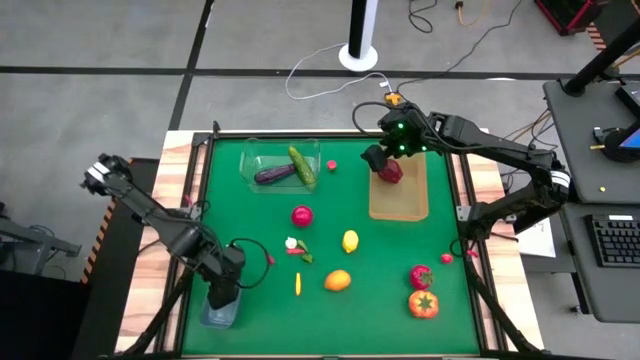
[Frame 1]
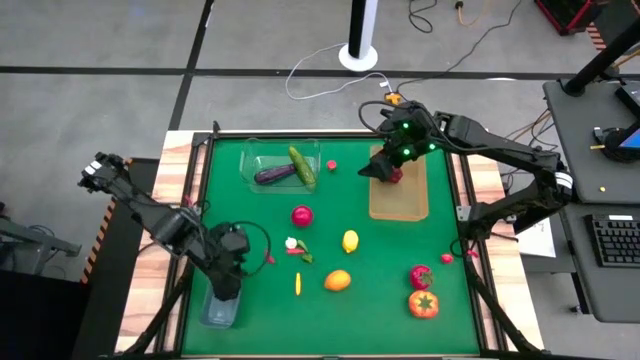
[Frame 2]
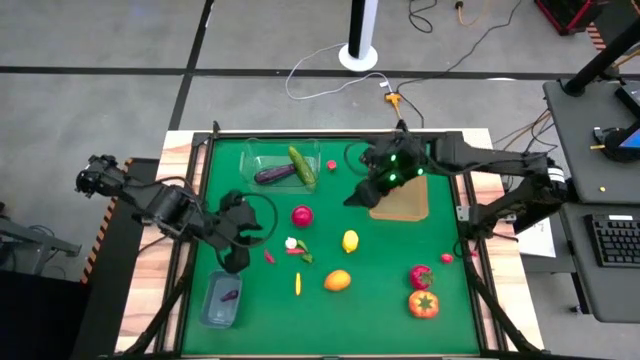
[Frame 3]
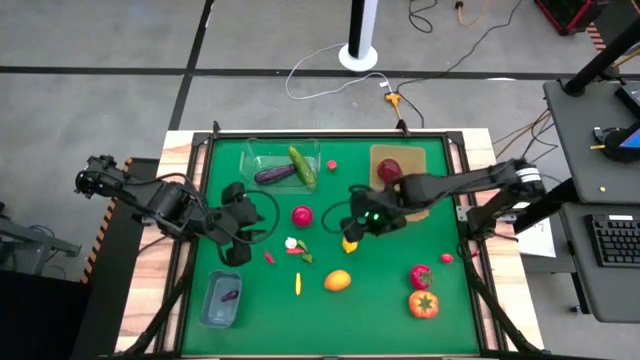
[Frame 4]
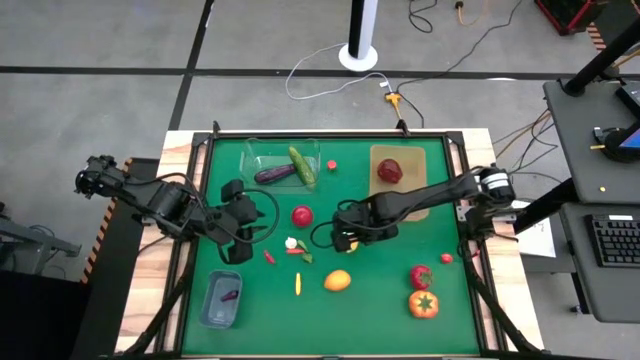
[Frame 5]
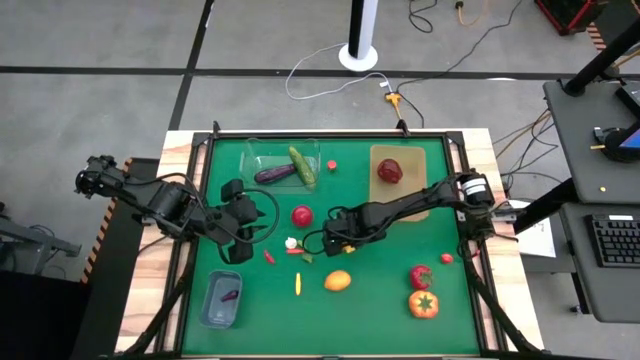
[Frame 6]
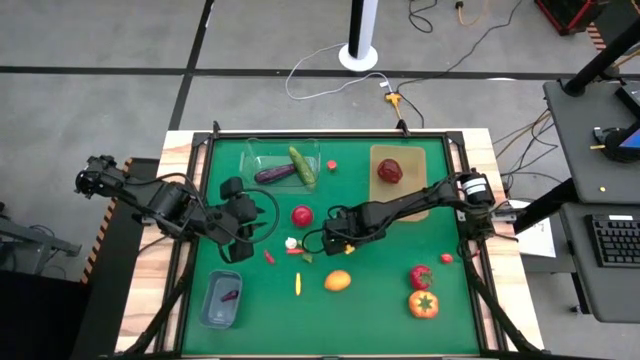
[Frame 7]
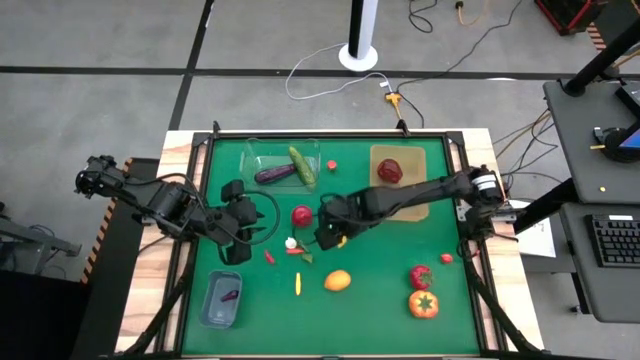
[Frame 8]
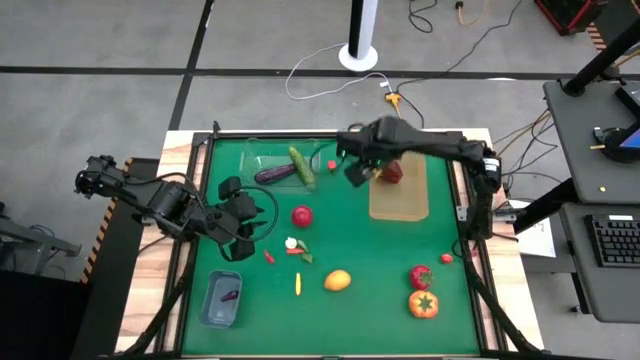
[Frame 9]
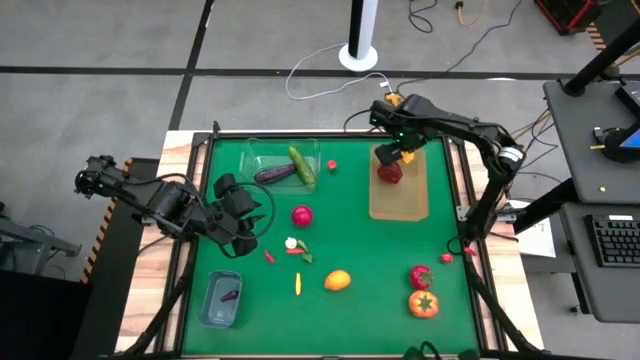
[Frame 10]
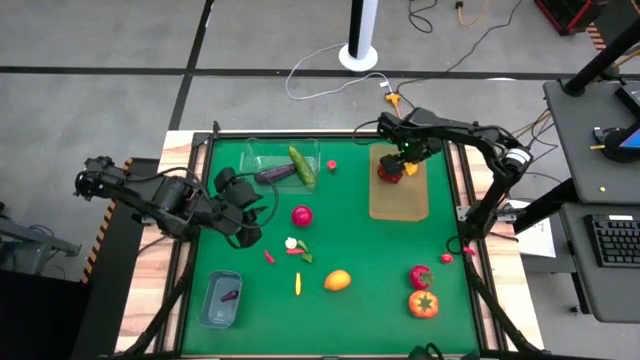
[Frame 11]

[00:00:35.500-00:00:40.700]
Task: Sort produce into baskets
Put the top yellow lemon into the orange bin

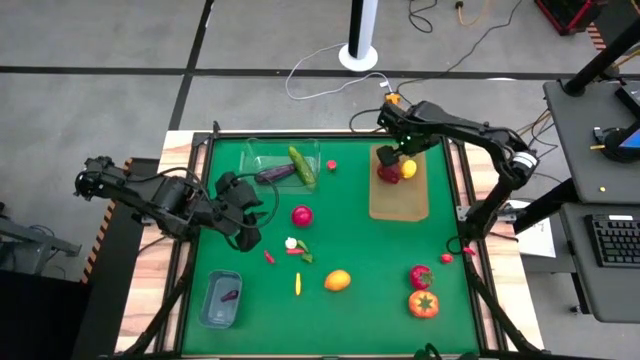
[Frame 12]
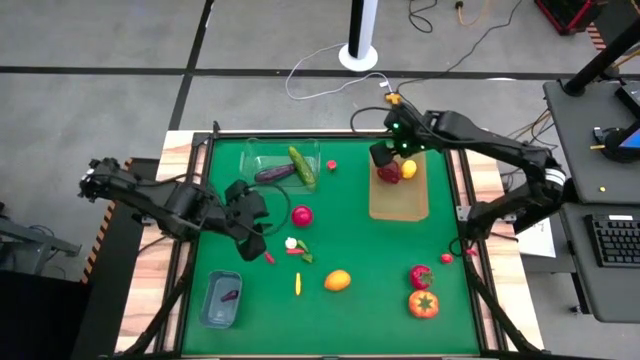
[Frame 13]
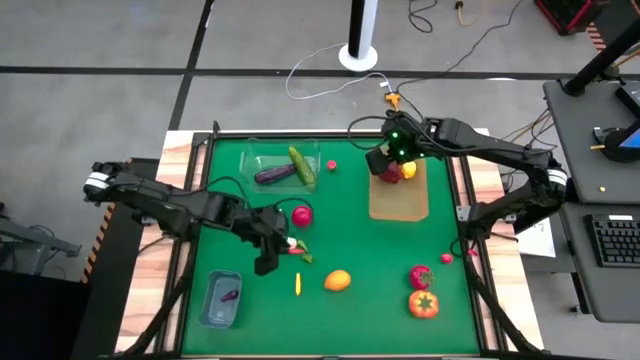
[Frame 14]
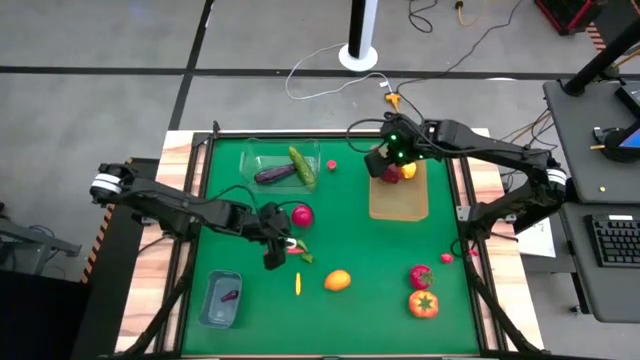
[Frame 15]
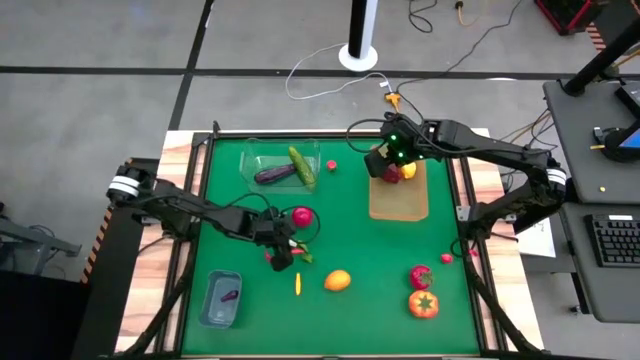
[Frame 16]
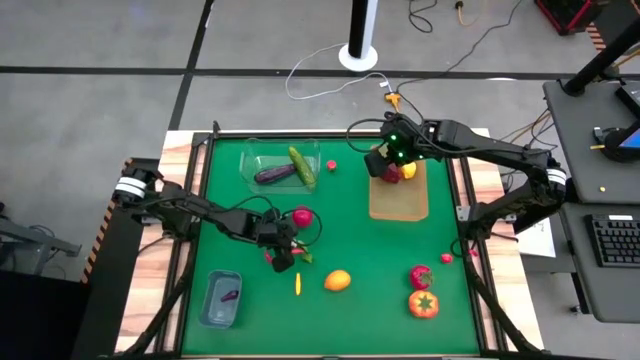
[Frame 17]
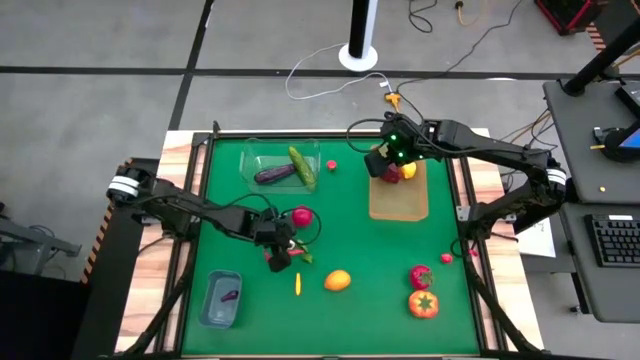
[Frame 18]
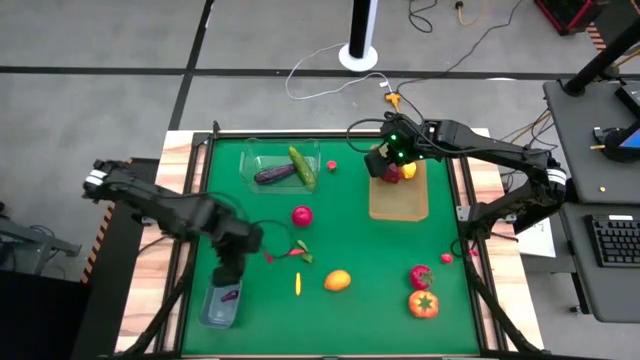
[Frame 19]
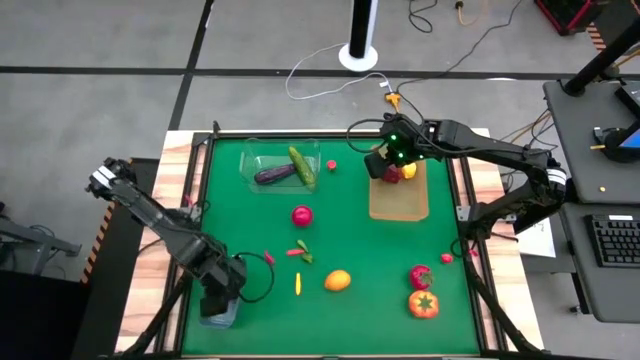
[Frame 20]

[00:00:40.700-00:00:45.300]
Put the white garlic into the blue bin

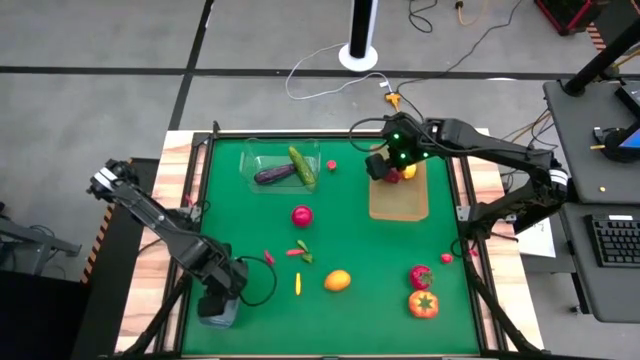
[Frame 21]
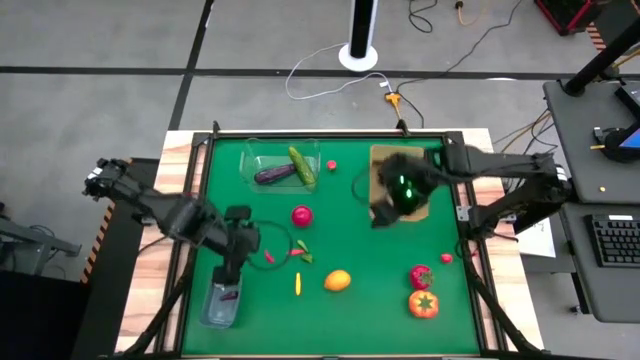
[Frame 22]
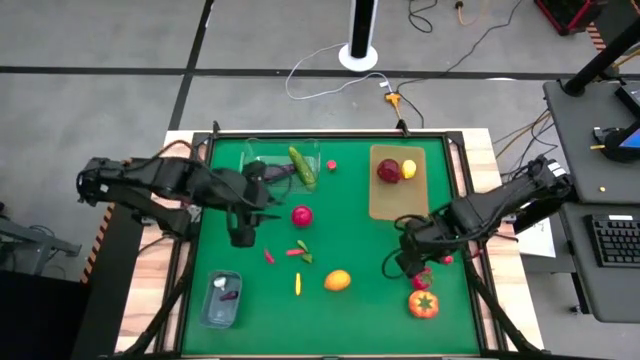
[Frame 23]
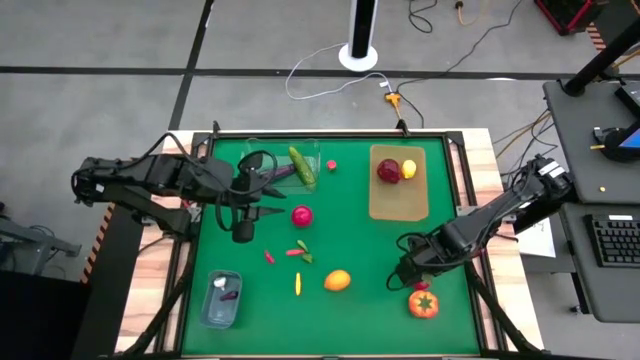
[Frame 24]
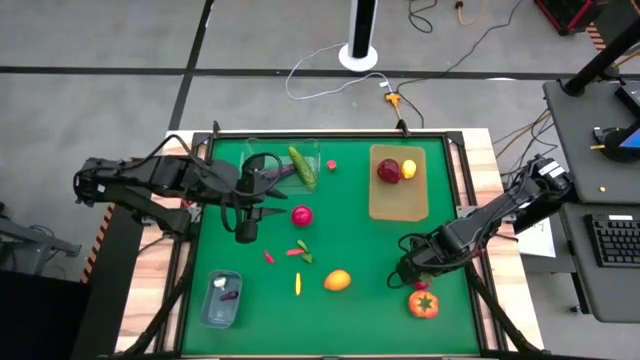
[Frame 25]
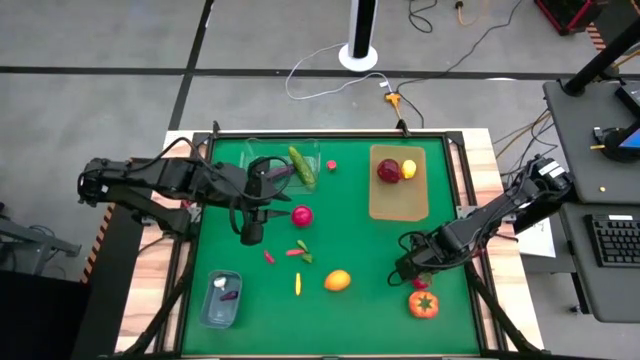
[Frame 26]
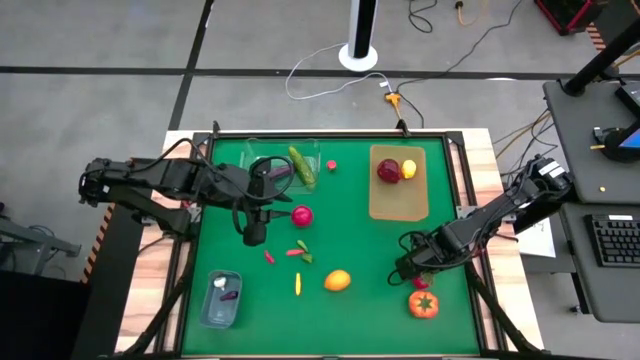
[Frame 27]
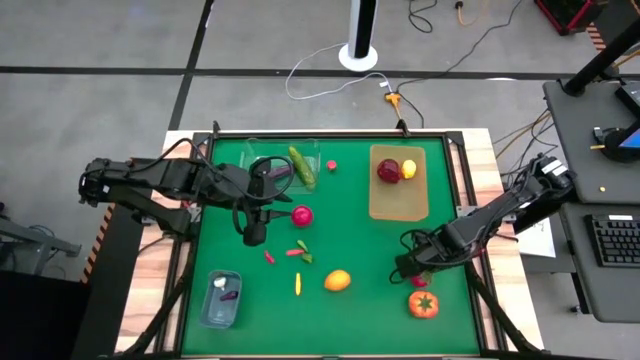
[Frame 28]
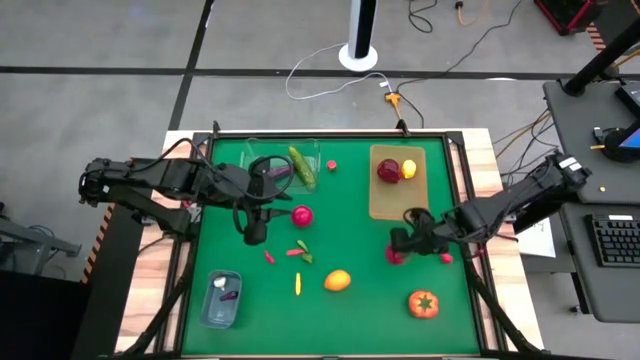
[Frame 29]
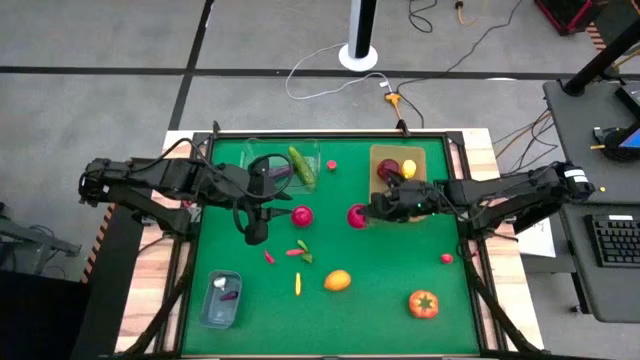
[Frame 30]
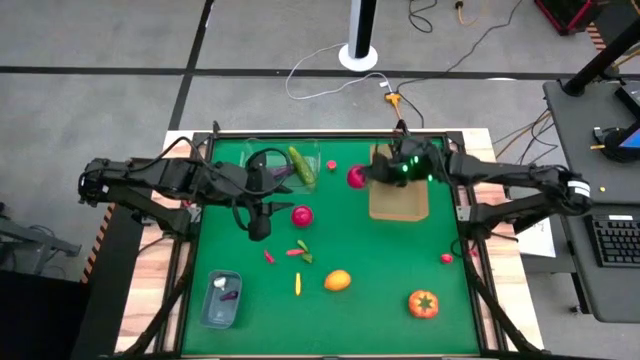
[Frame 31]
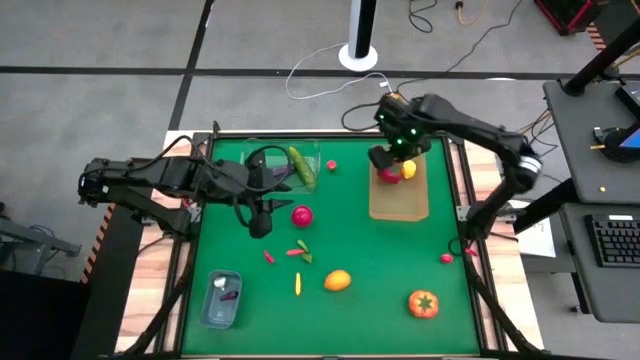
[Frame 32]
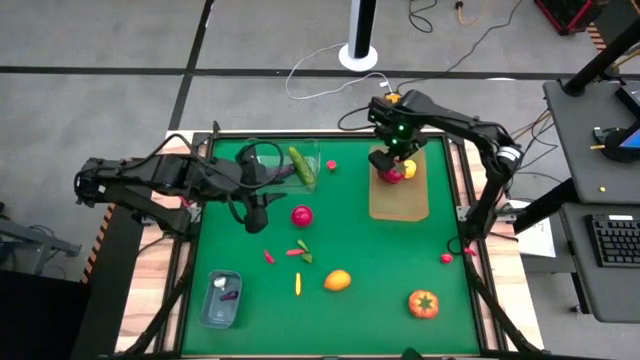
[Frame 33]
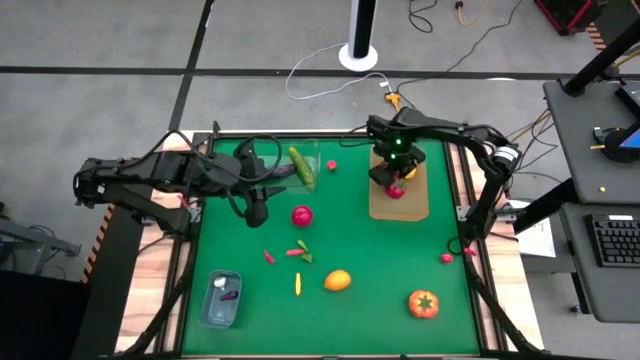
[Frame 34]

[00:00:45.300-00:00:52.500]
Put the bottom red tomato into the orange bin

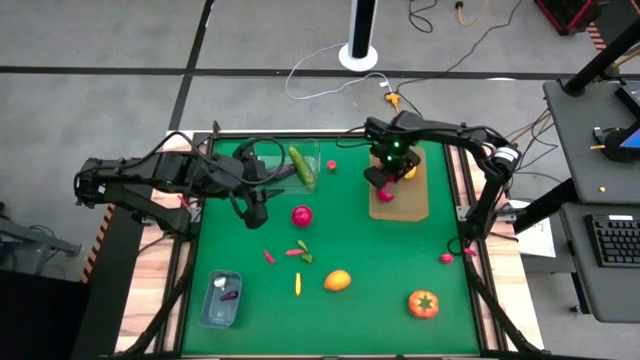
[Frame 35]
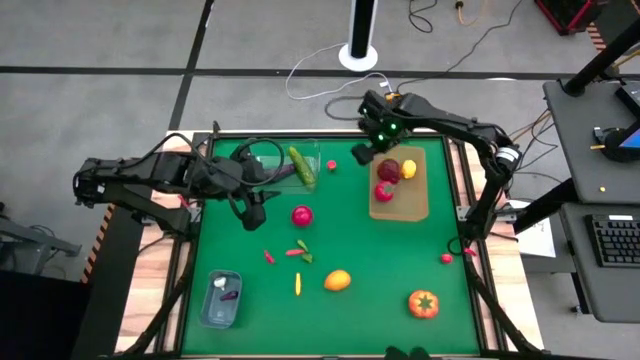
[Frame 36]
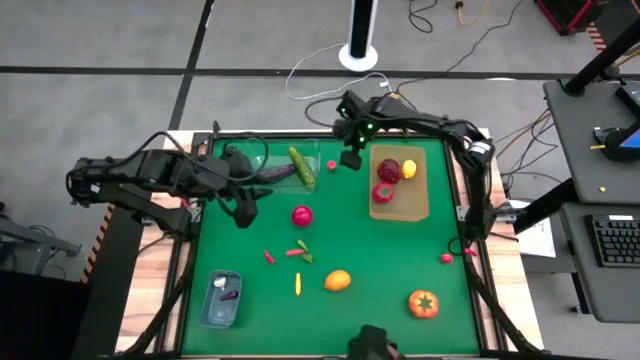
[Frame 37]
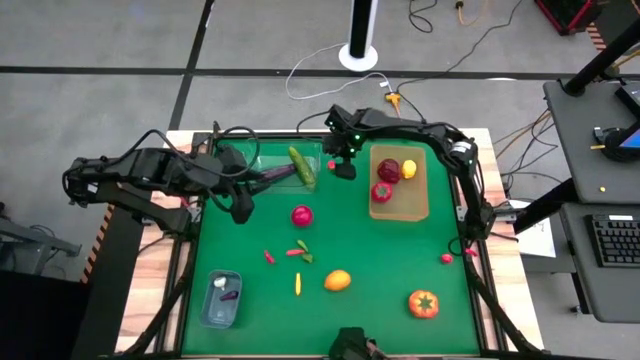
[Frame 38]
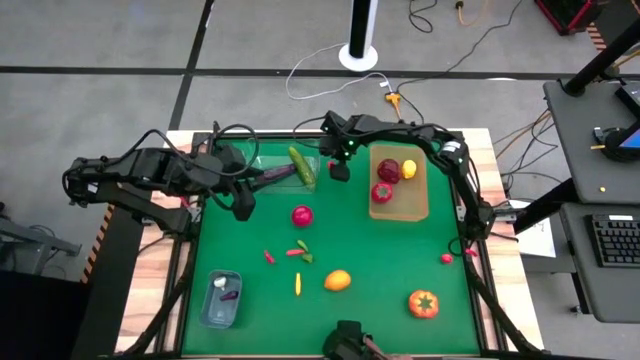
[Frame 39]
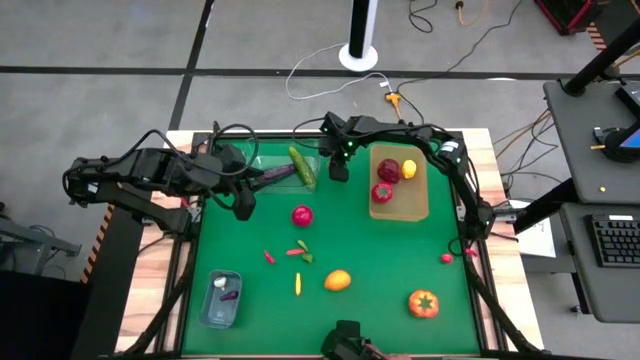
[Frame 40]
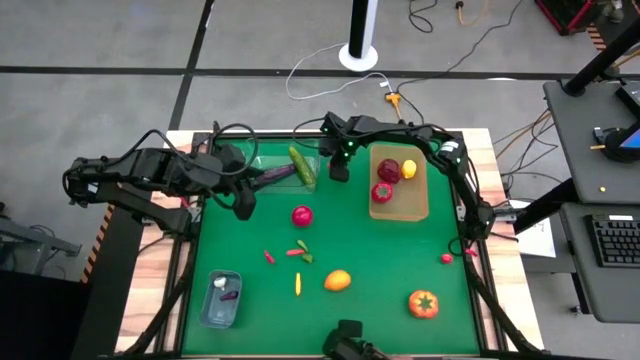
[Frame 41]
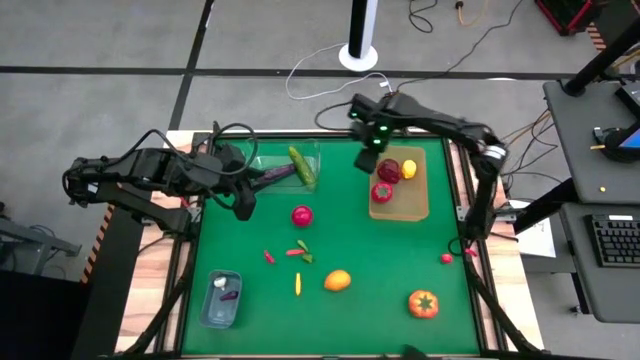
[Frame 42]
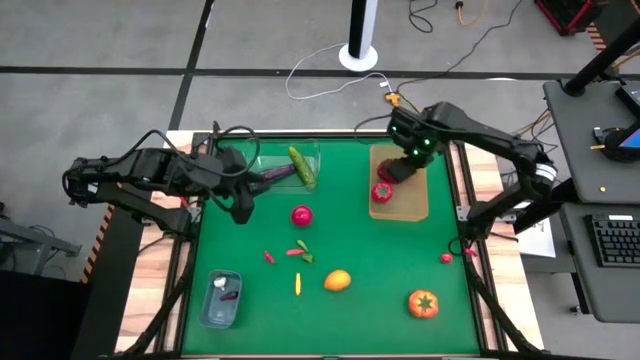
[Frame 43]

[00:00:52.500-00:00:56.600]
Put the top orange peach into the orange bin
